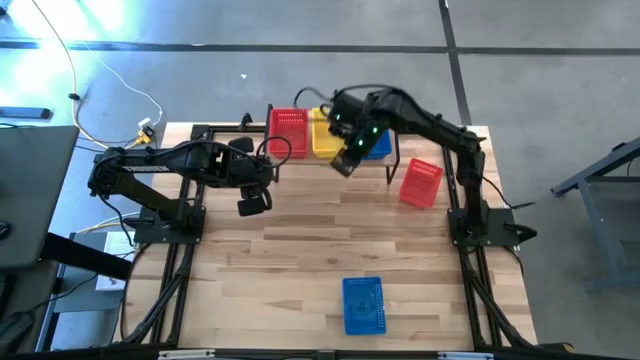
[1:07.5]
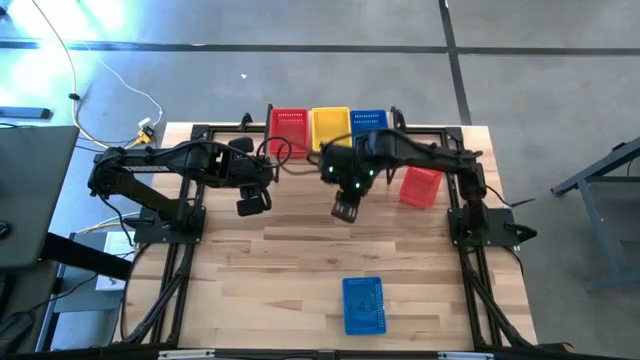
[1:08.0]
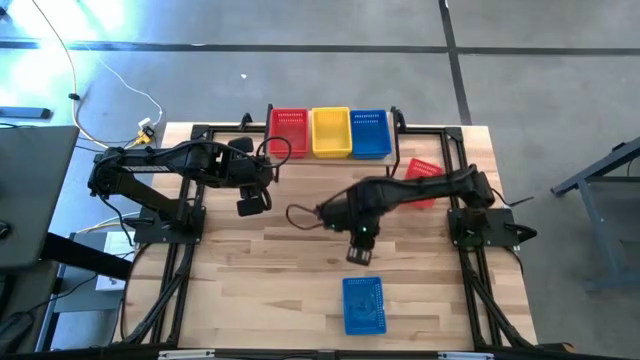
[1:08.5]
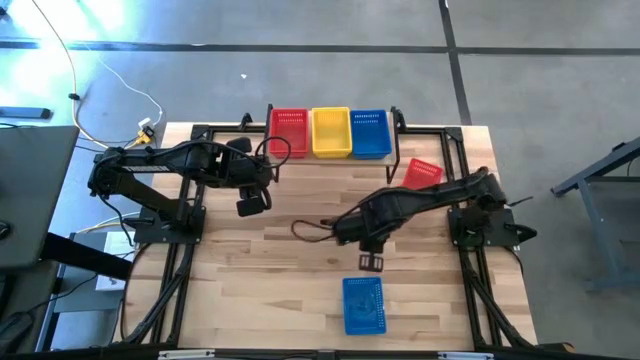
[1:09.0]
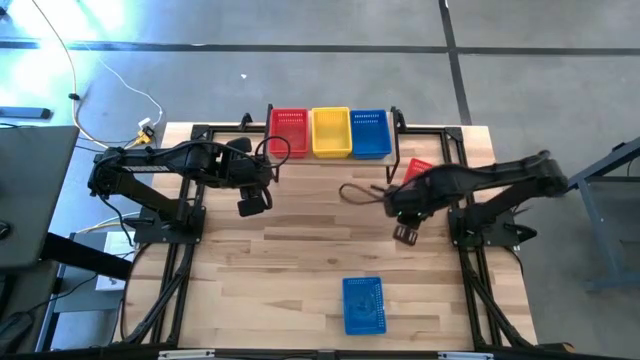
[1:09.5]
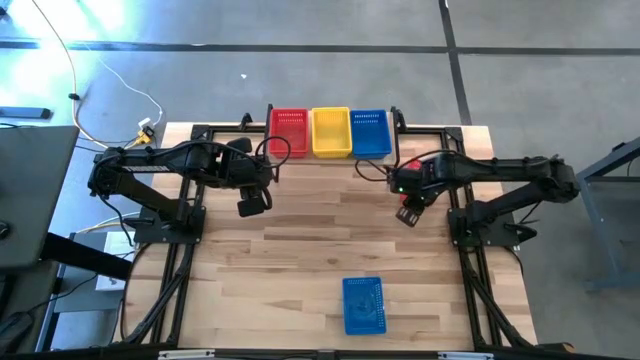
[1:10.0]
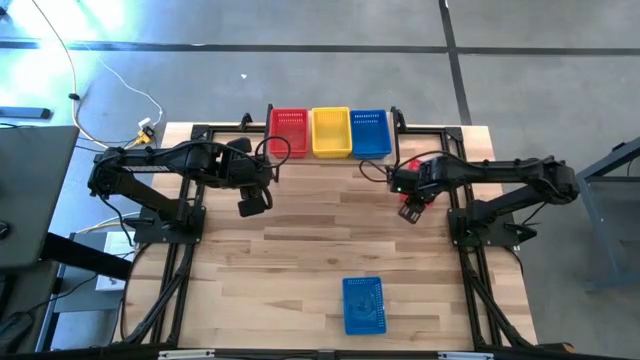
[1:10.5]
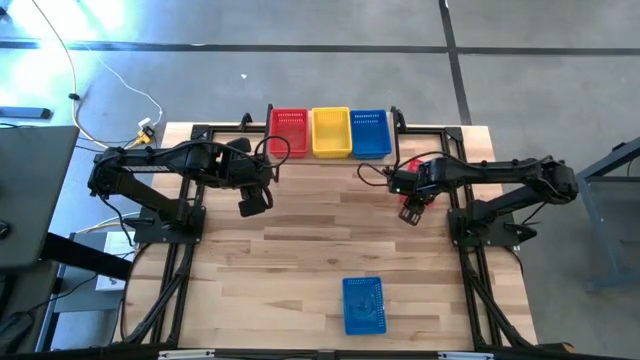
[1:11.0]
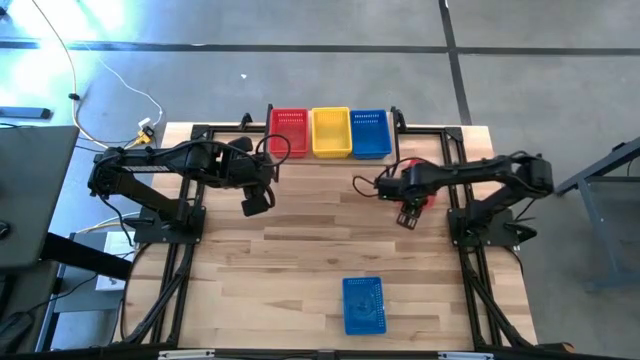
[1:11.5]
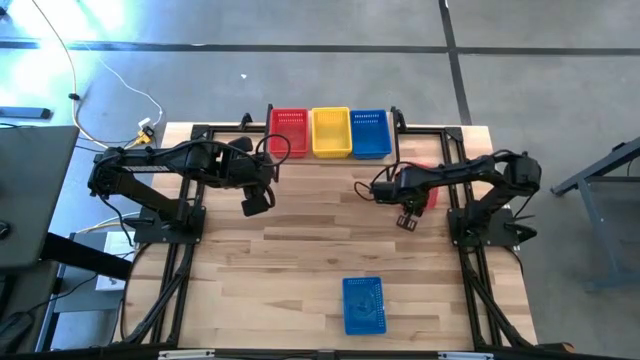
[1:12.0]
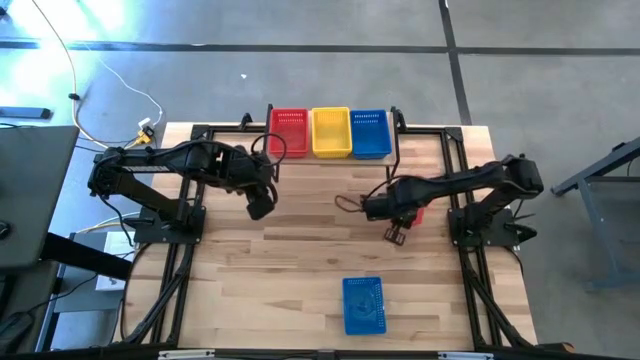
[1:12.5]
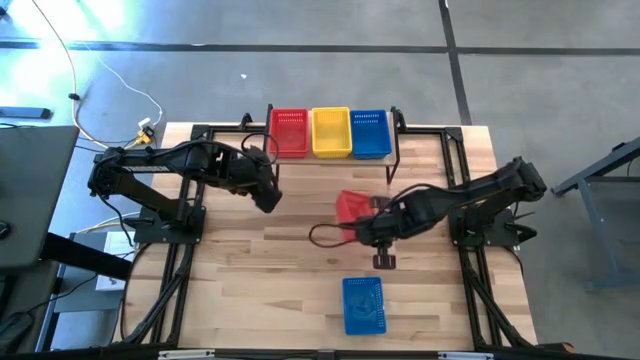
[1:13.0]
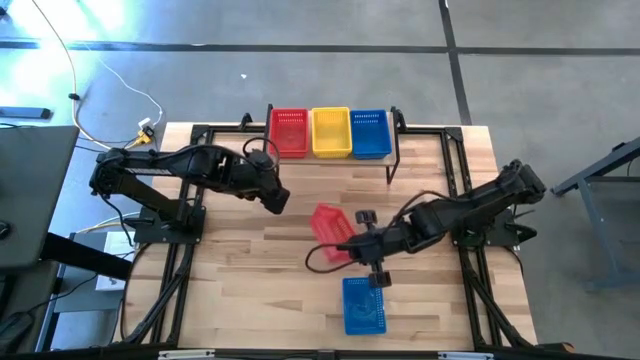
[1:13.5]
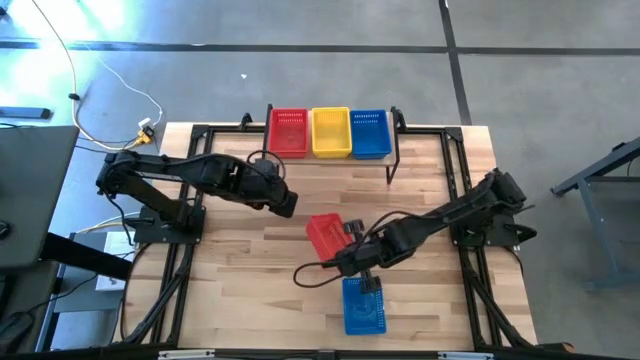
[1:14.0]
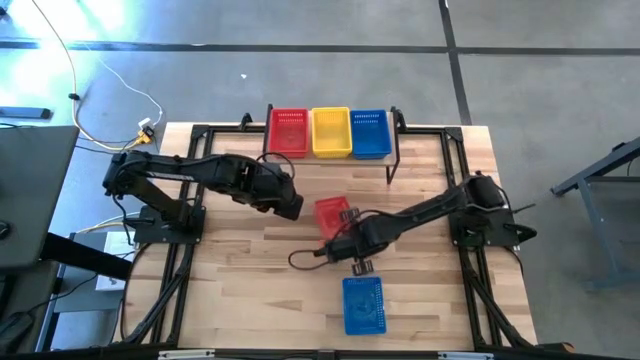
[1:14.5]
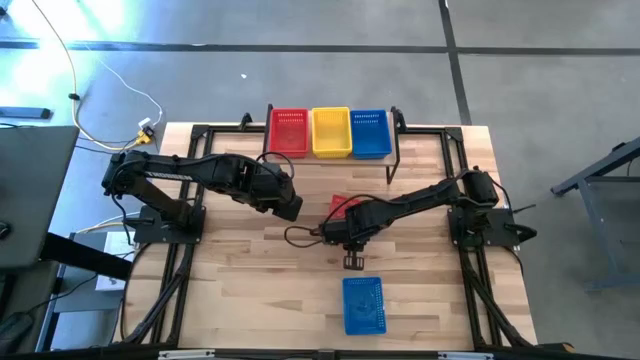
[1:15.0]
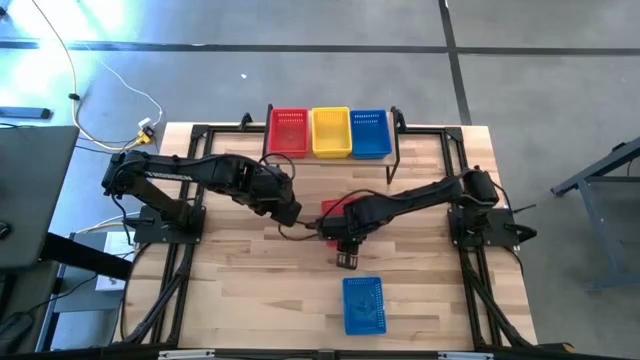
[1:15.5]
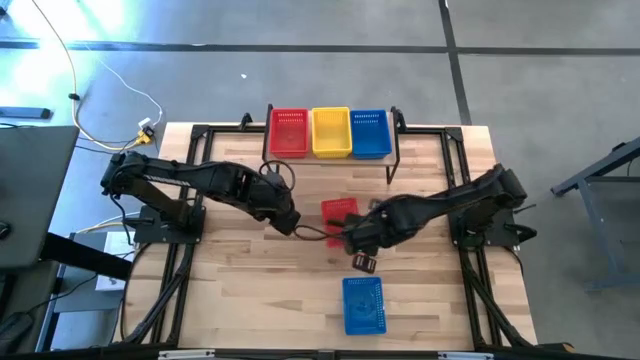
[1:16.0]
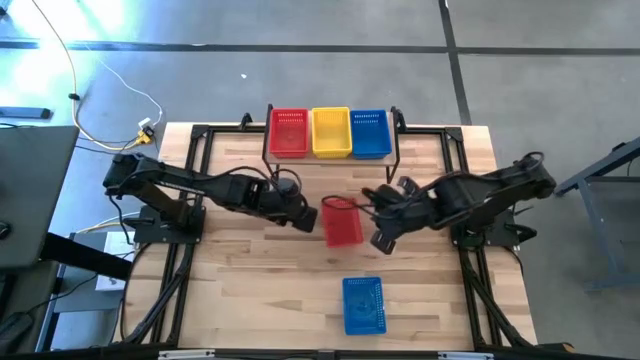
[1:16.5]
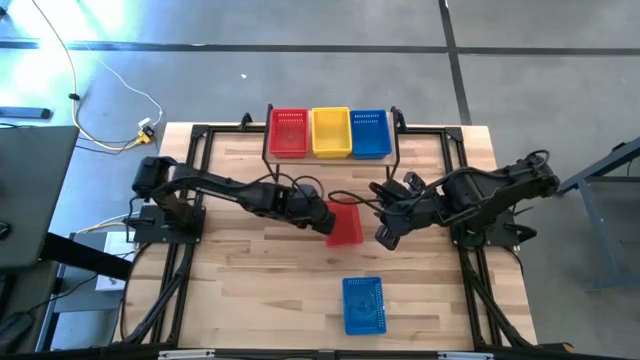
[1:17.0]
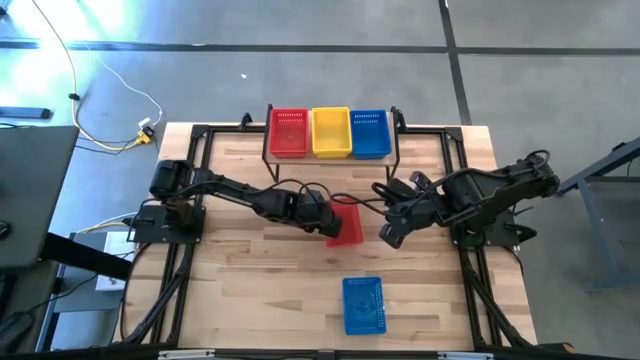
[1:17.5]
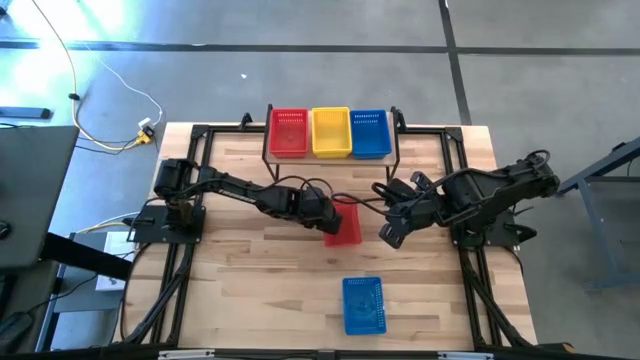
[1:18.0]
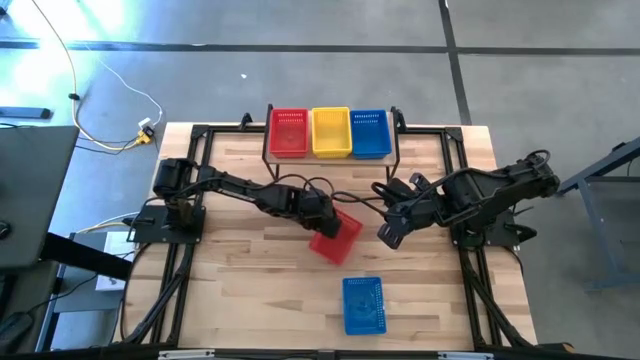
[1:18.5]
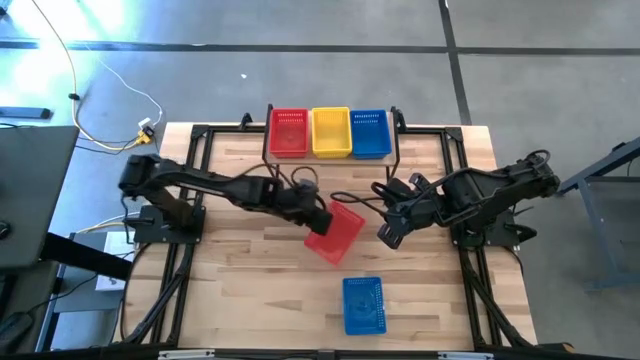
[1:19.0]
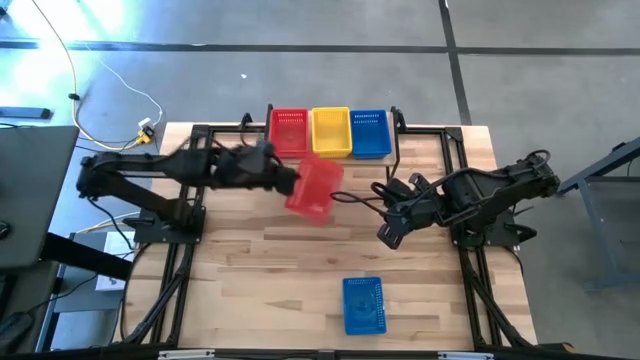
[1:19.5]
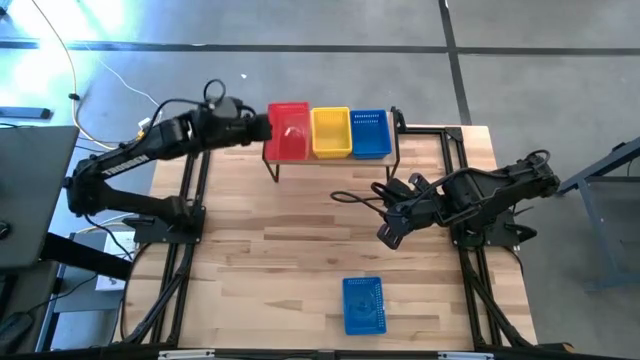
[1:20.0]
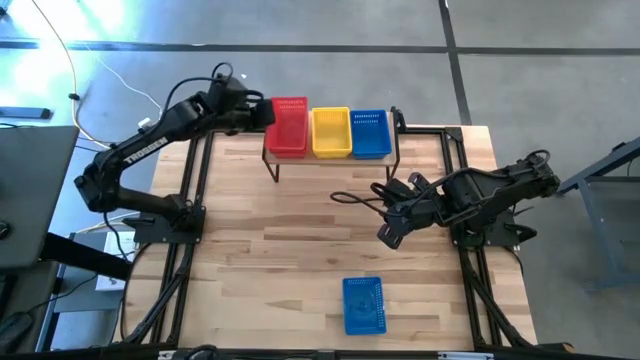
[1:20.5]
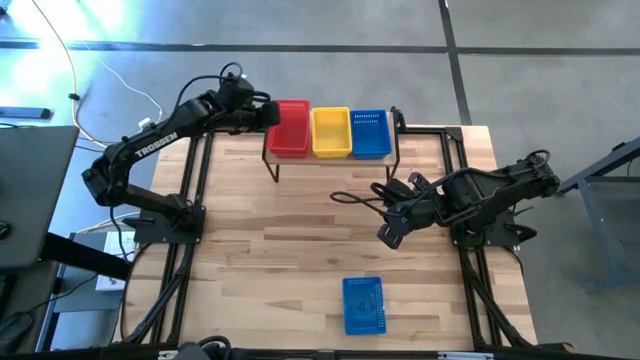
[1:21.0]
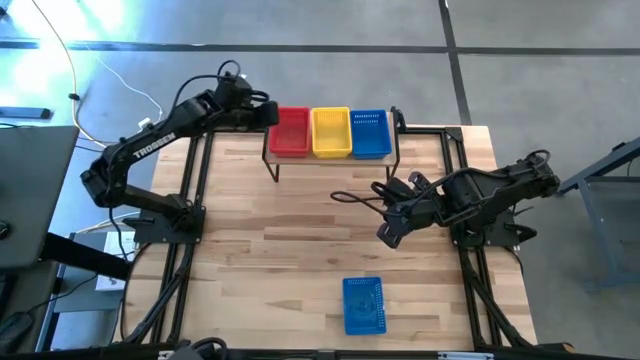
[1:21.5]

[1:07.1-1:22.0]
Task: Stack baskets on shelf by color
Stack the red bin on top of the red bin on the shelf

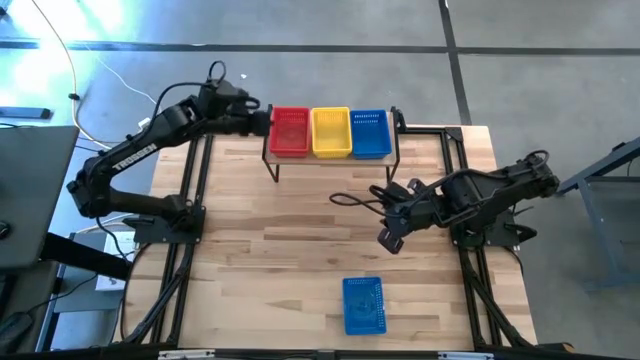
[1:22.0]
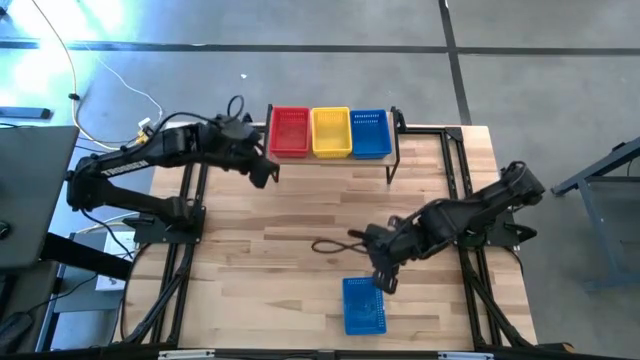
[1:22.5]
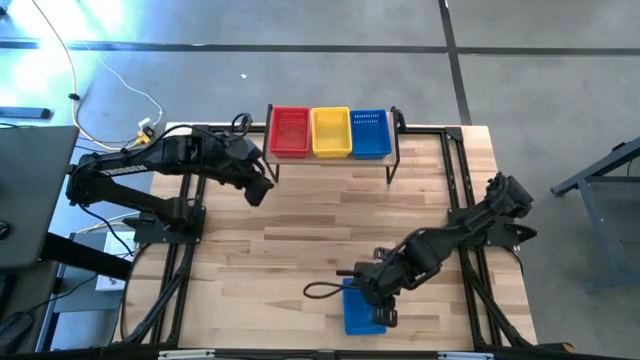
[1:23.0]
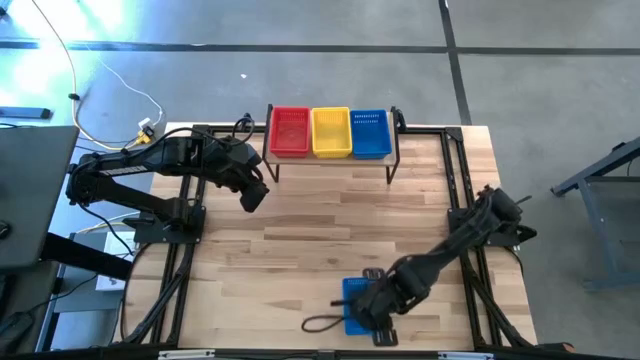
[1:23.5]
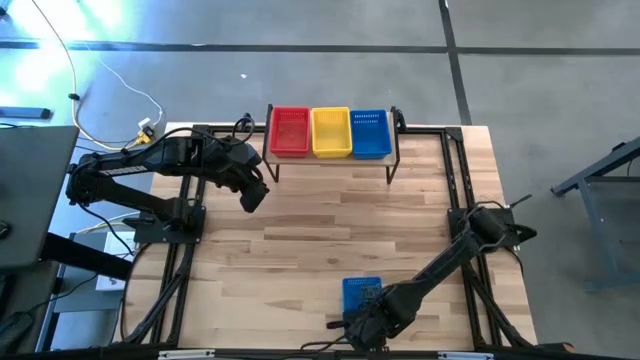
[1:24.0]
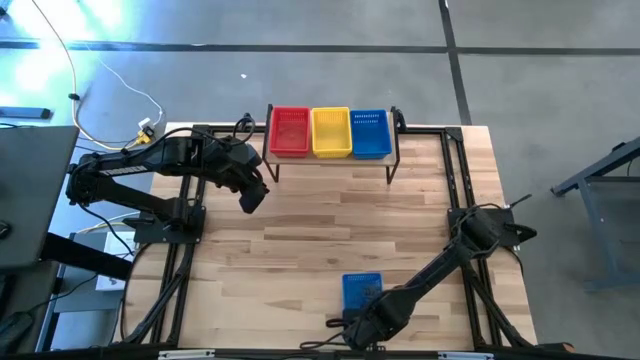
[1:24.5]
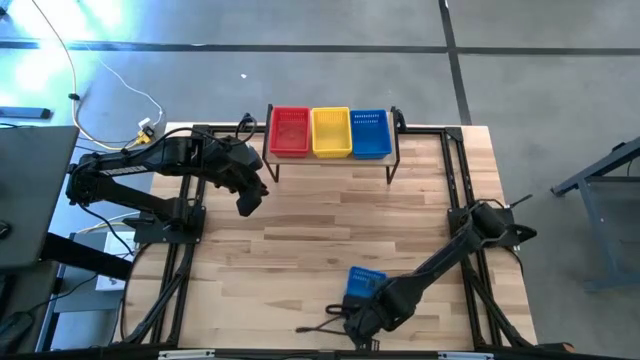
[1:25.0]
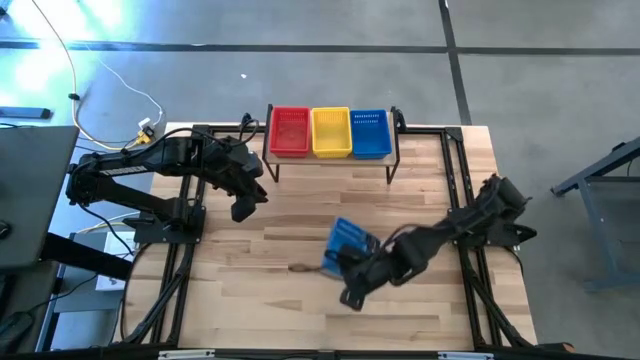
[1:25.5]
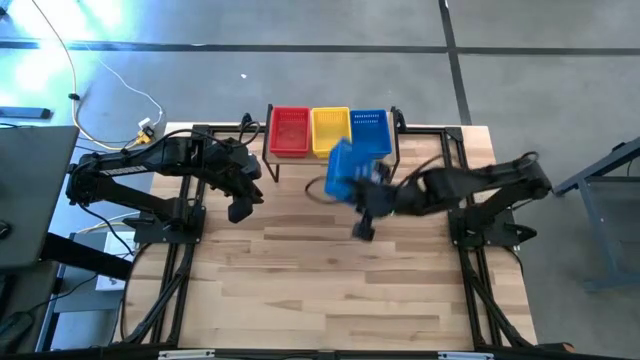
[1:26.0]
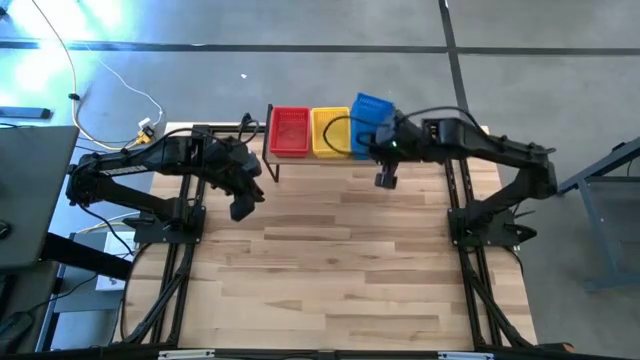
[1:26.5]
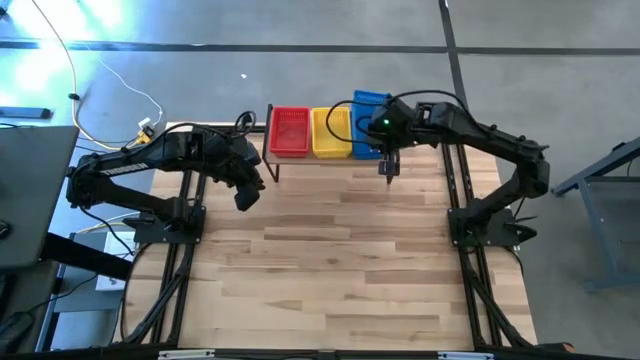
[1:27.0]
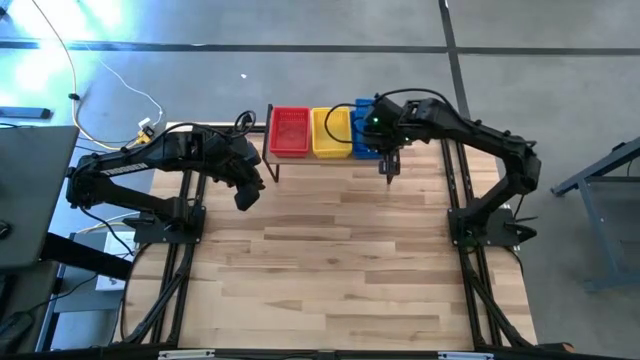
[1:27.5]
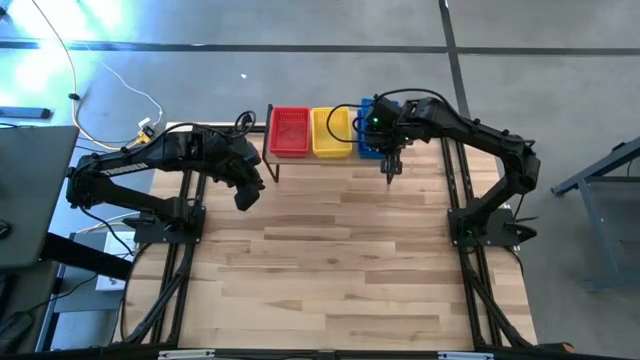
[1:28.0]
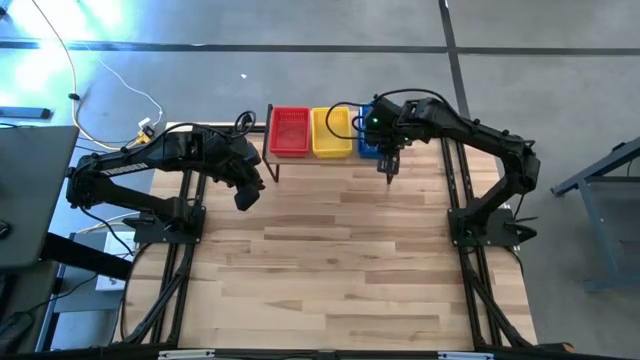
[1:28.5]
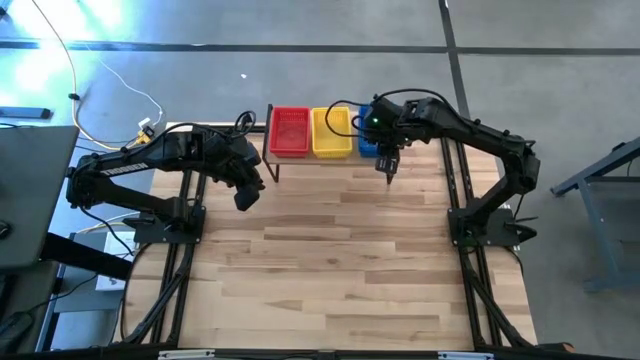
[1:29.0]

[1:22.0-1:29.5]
Stack the blue bin on top of the blue bin on the shelf
